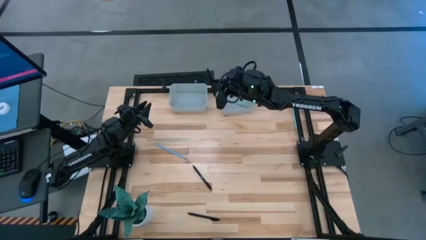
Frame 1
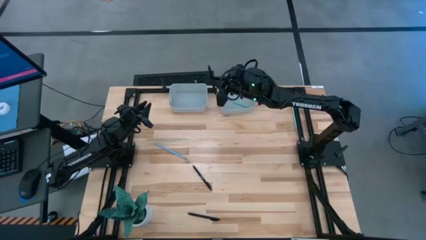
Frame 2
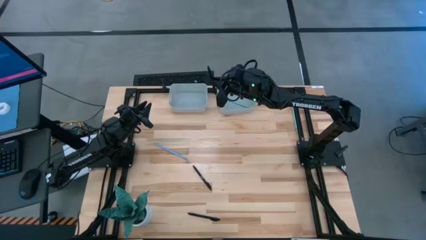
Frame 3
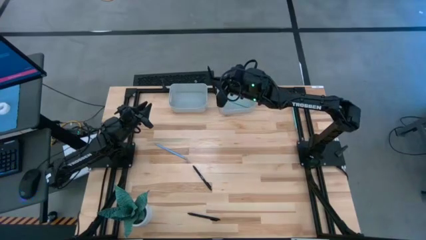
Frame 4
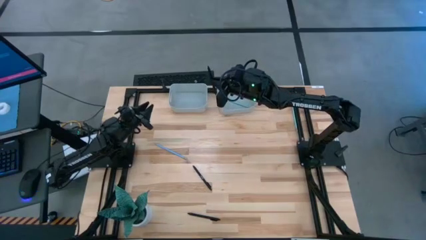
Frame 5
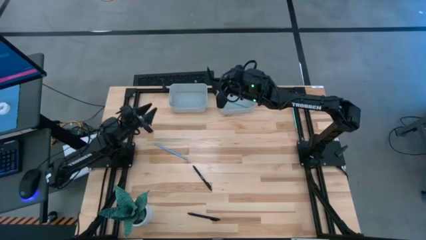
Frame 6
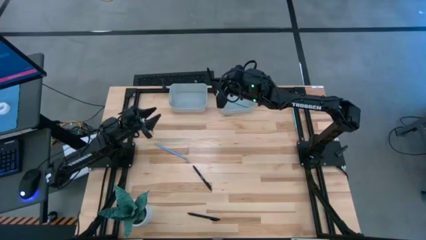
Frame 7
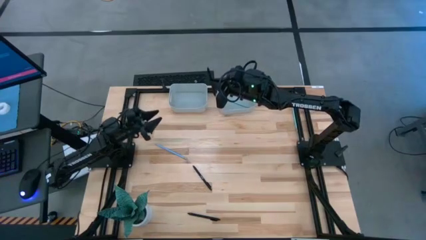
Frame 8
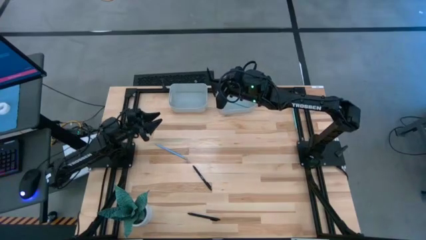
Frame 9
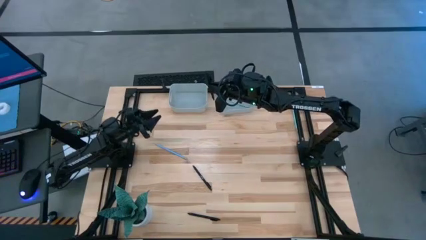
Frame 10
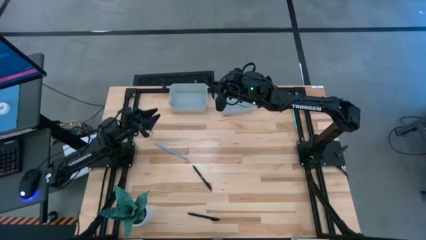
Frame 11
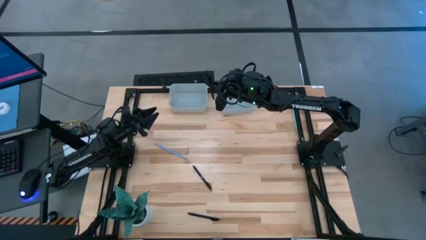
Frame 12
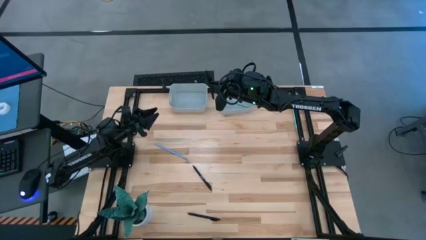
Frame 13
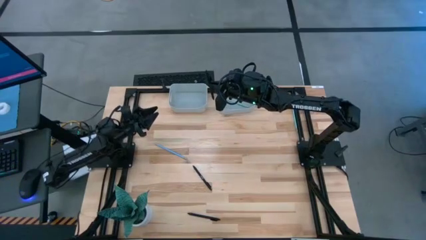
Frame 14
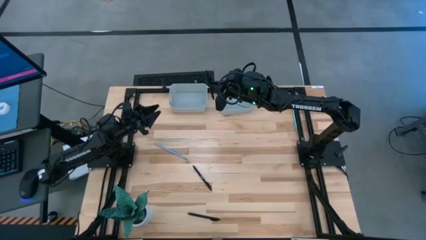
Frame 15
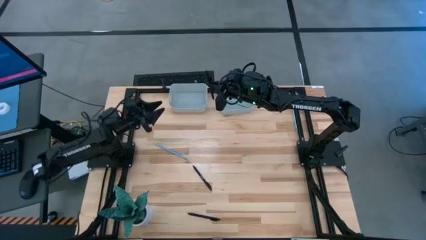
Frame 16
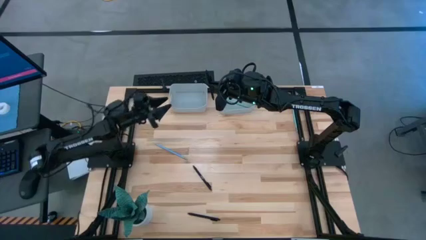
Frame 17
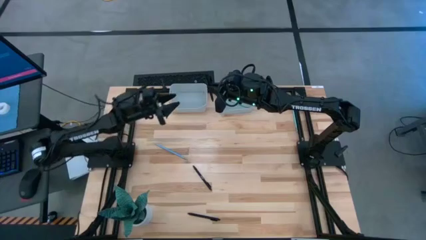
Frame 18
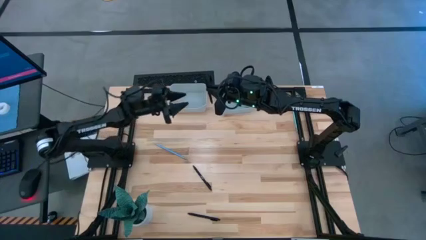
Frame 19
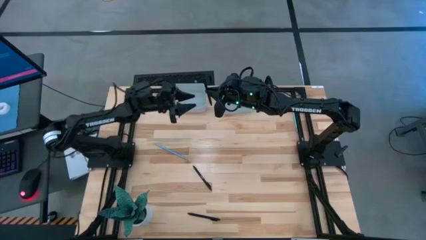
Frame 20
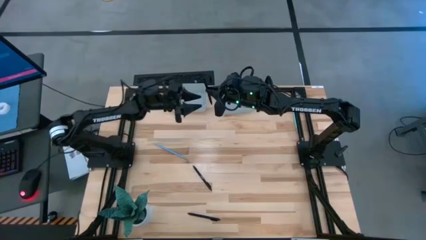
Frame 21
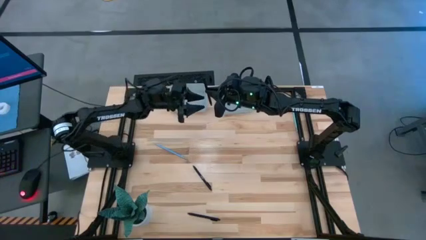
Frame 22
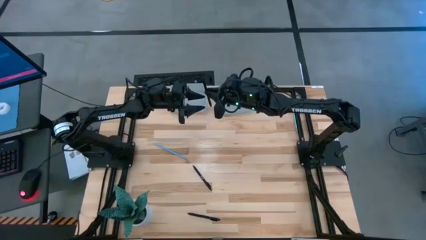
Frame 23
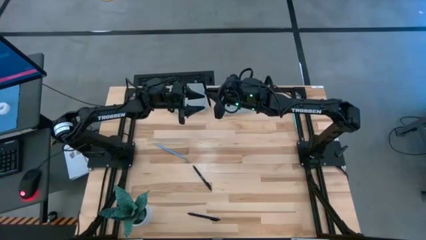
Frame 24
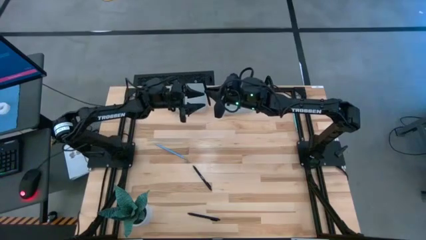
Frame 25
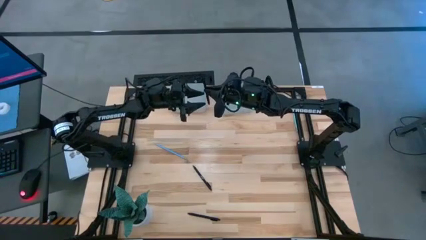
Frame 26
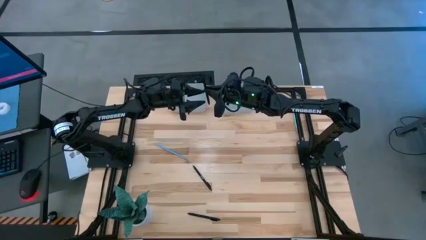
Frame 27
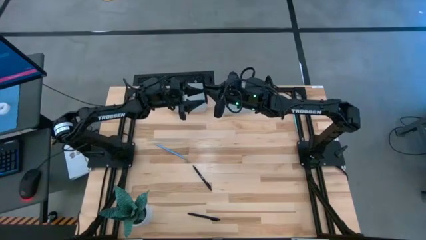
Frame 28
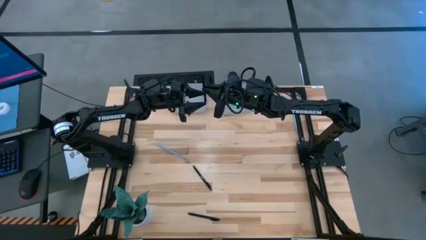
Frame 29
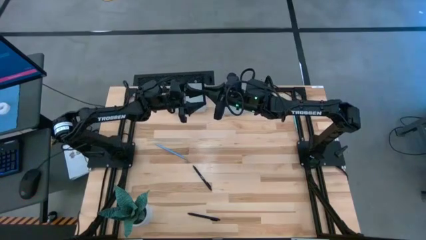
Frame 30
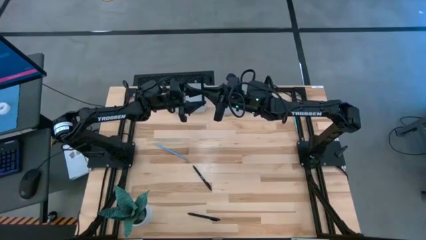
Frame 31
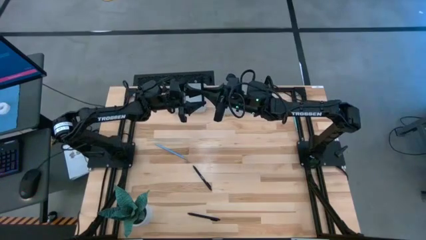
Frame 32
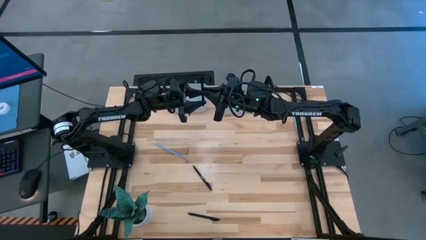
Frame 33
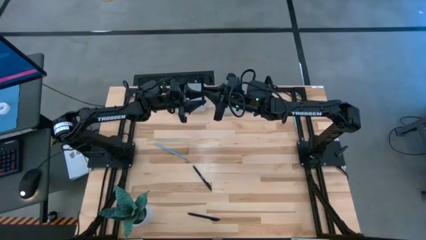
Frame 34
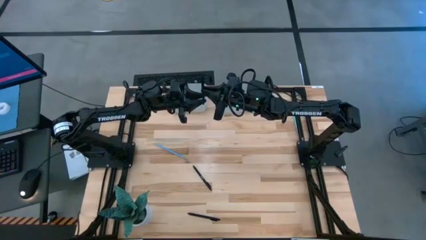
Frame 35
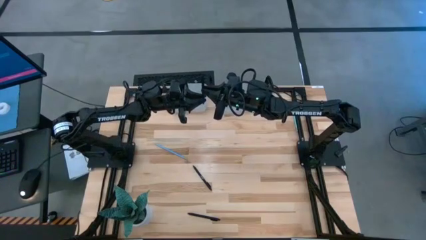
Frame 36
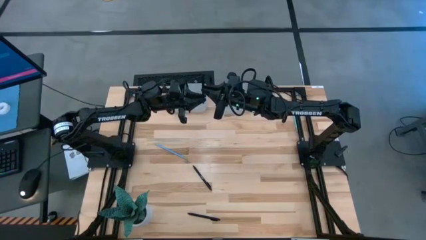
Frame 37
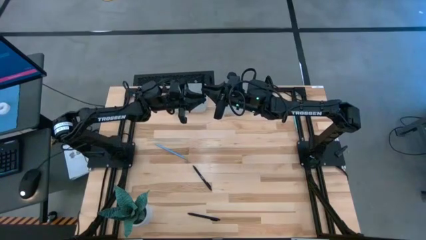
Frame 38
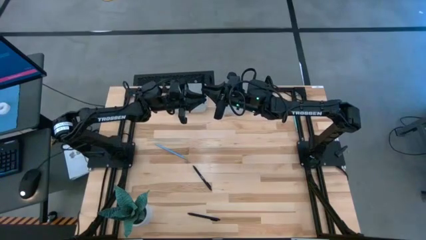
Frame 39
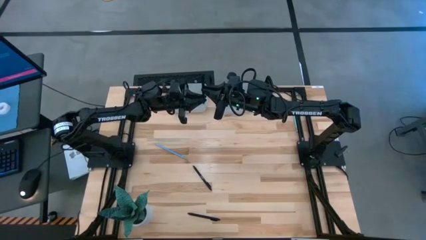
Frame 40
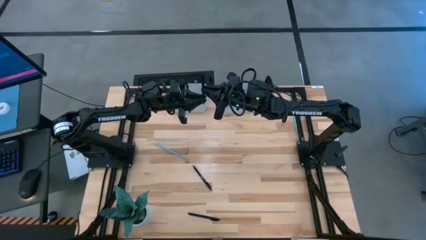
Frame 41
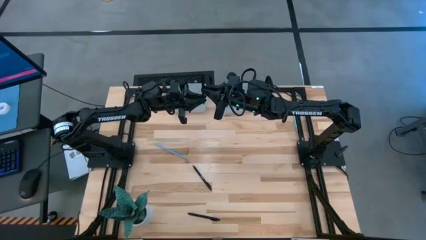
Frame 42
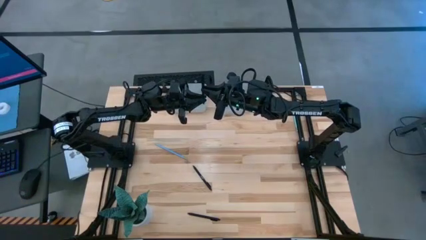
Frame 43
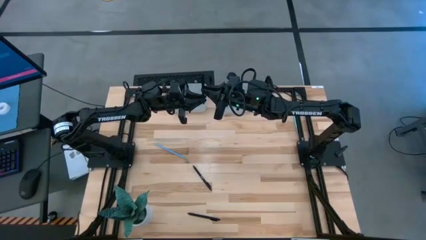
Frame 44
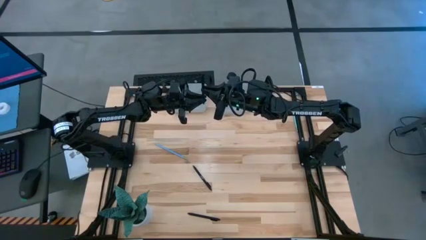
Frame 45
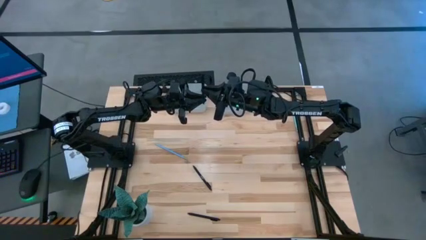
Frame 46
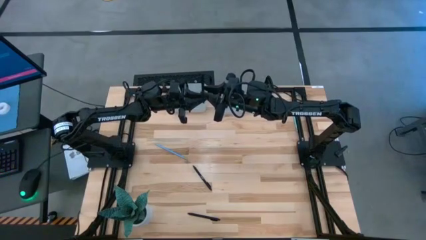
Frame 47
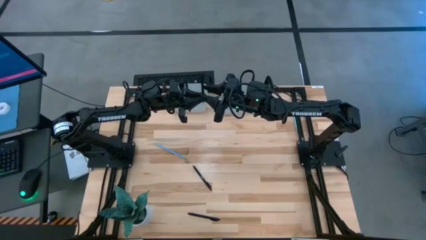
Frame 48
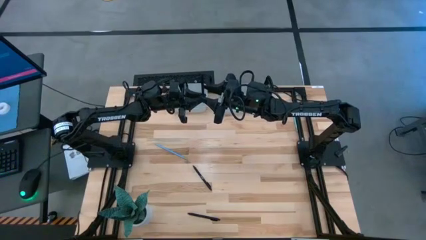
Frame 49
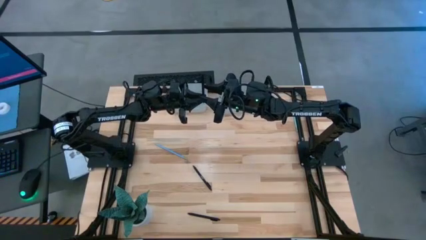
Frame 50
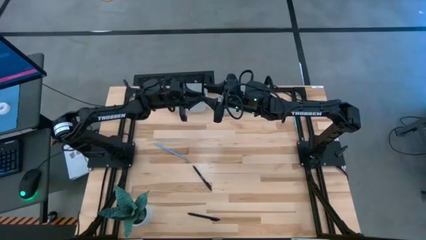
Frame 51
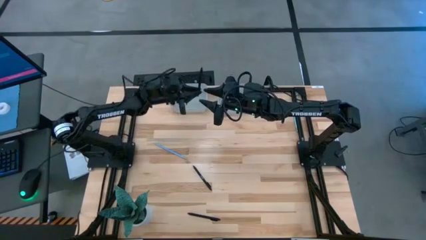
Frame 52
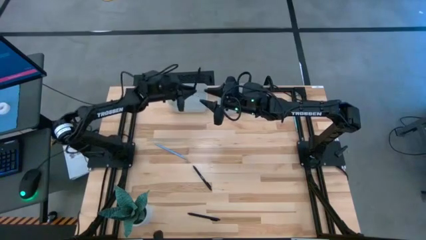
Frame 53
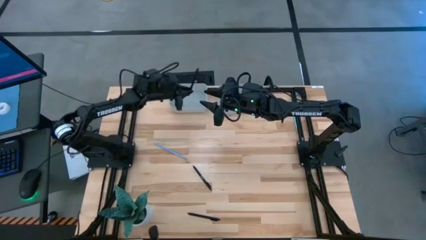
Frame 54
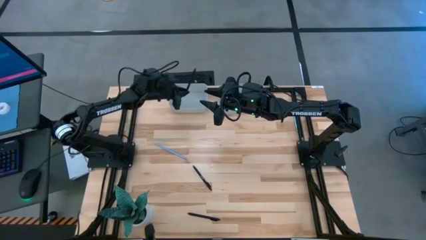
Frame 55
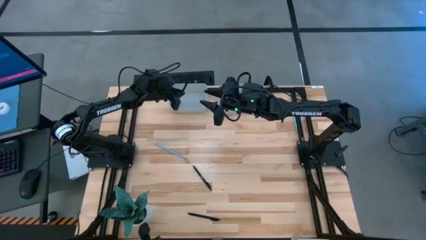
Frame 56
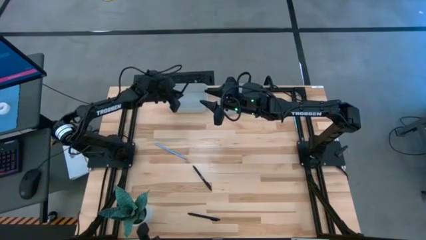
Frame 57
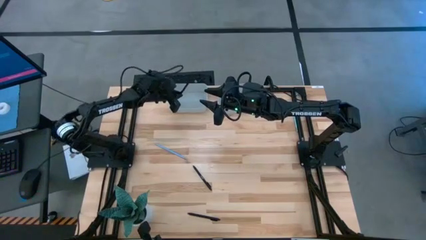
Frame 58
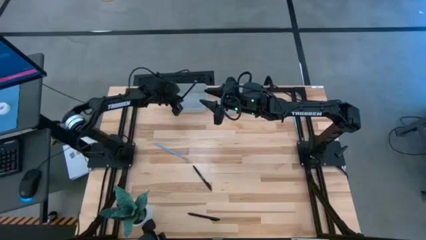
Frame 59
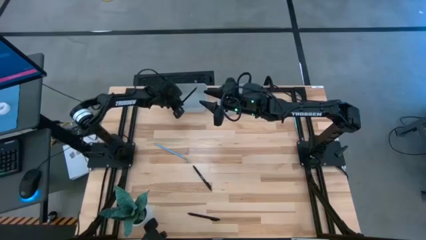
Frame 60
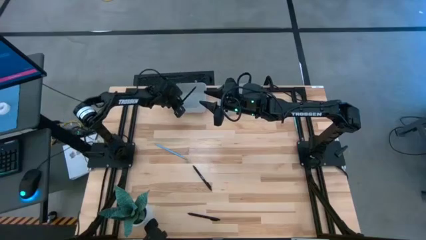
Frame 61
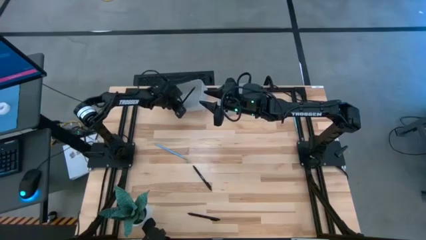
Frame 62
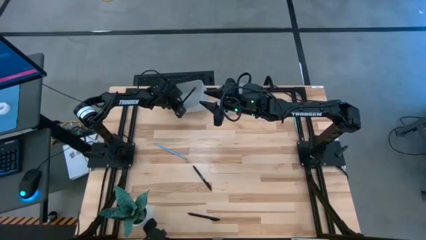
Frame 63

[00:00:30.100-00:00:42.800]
Task: Sort pens & pencils
Put the top right black pen into the left gray bin

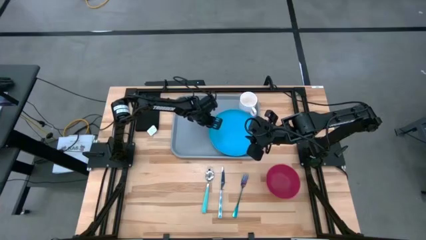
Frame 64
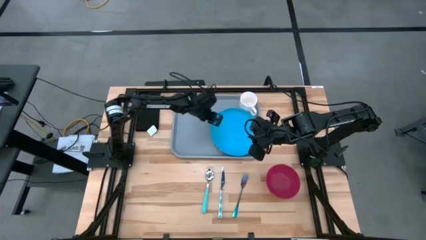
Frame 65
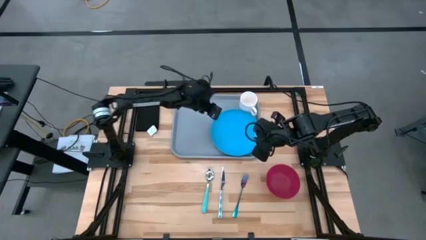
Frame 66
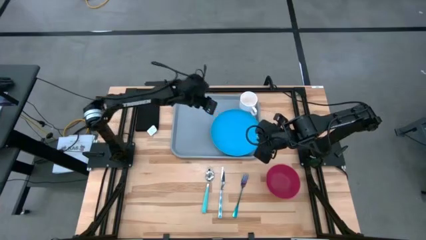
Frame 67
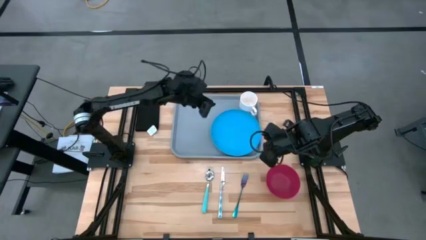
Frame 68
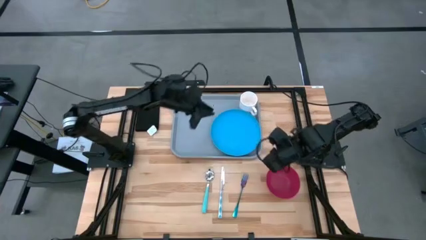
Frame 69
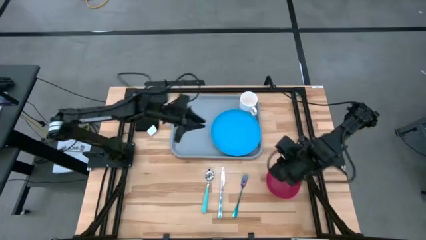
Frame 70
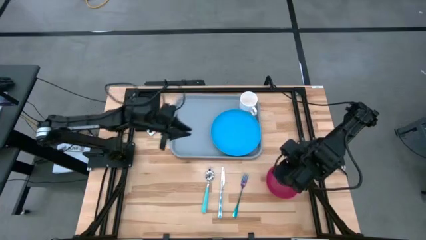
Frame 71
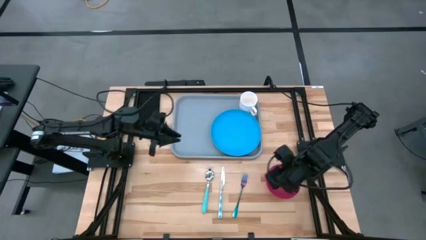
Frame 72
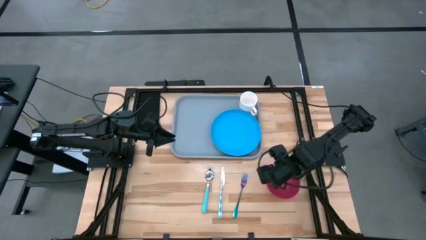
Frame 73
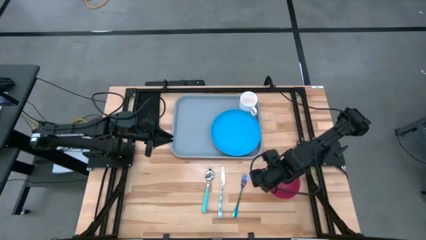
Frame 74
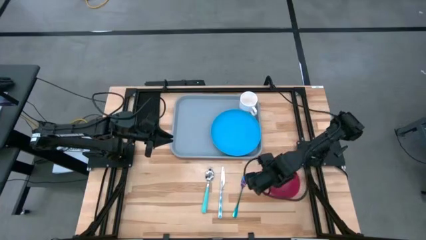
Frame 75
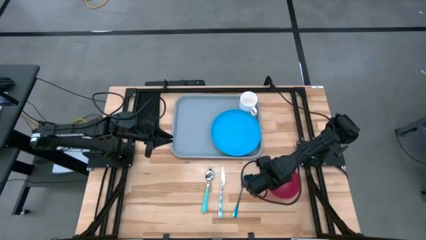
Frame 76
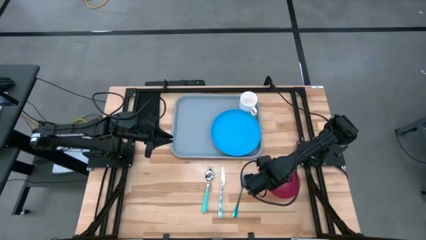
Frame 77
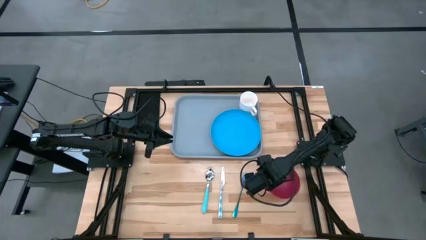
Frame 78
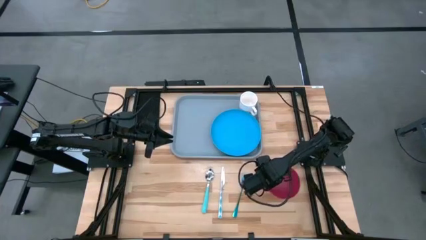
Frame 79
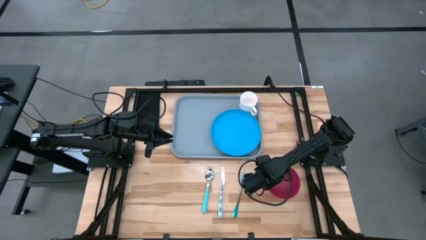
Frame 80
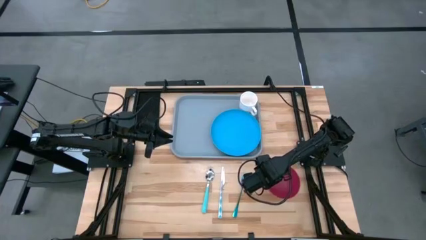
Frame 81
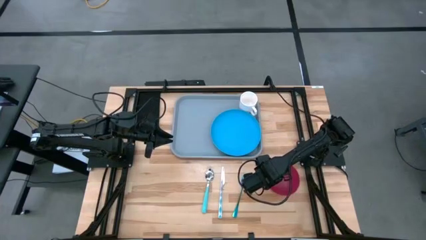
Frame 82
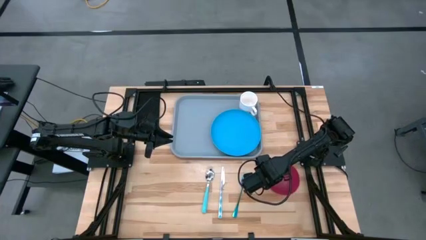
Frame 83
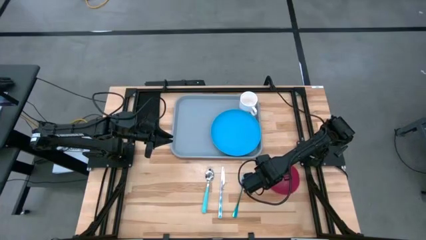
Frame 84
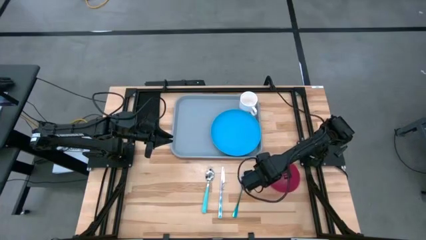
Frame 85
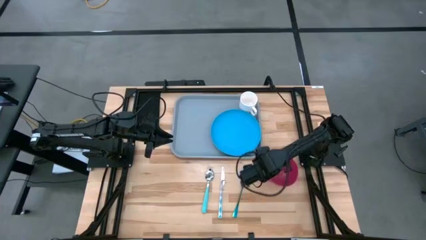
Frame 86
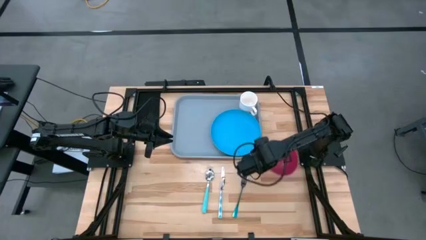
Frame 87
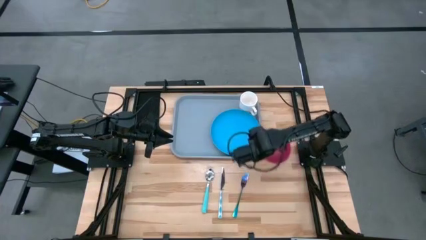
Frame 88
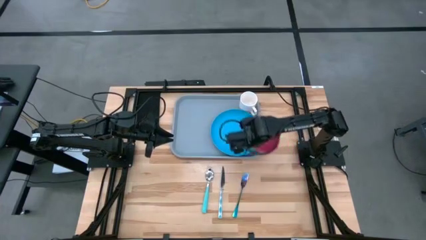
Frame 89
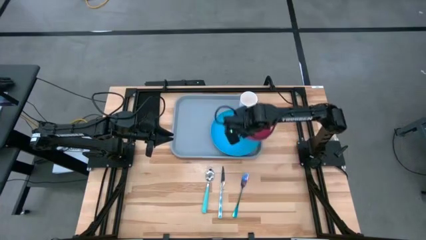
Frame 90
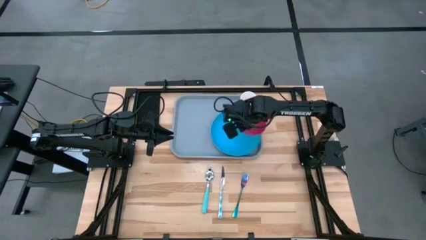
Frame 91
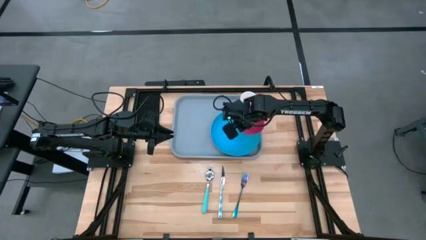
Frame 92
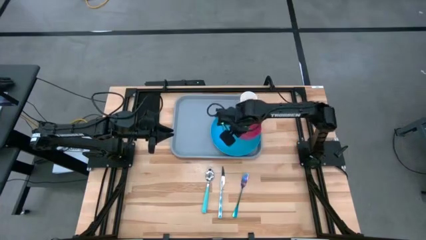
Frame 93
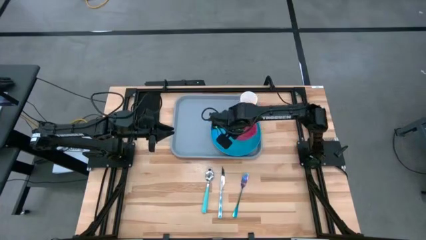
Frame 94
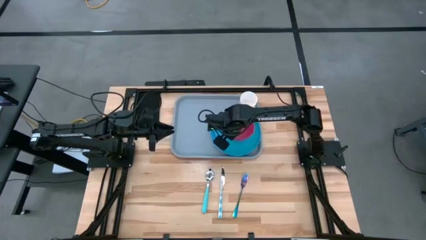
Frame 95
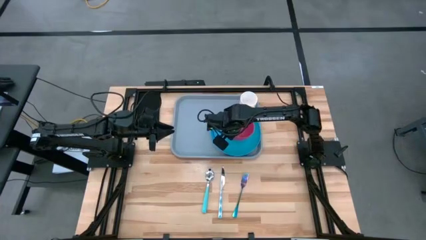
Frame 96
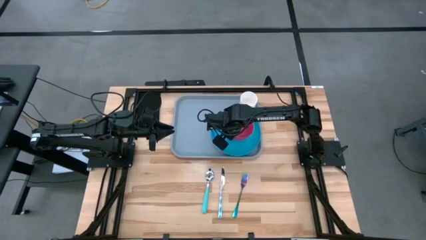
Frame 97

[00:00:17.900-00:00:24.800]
Task: Set up tray
Put the pink bowl on top of the blue plate
